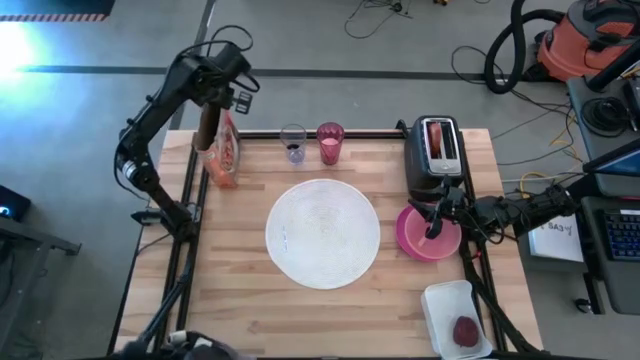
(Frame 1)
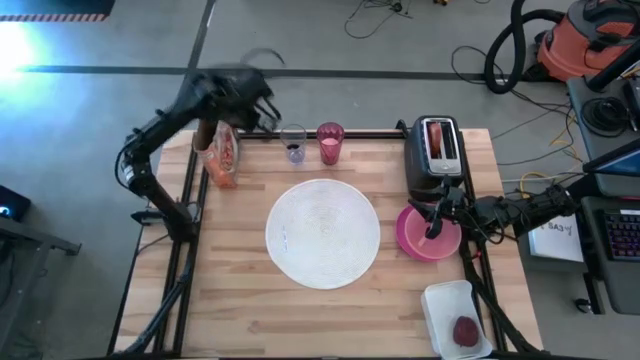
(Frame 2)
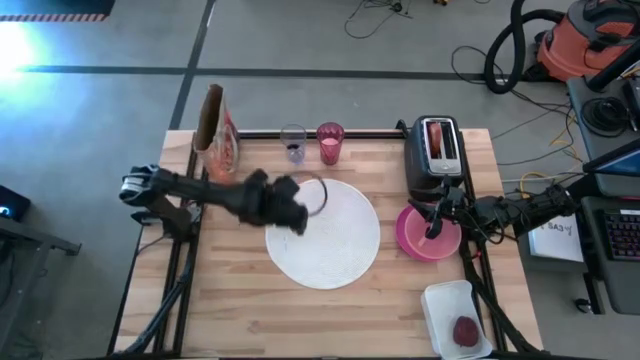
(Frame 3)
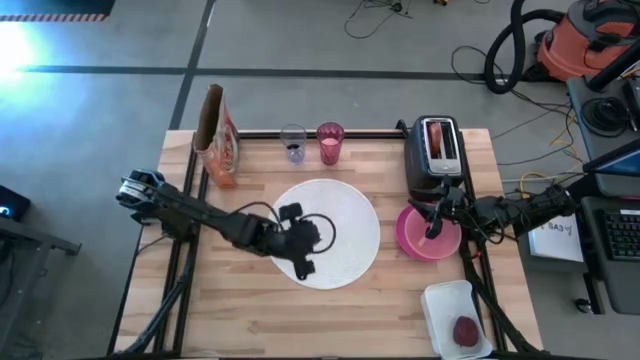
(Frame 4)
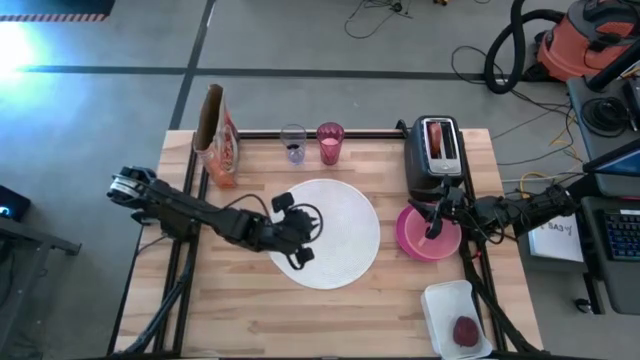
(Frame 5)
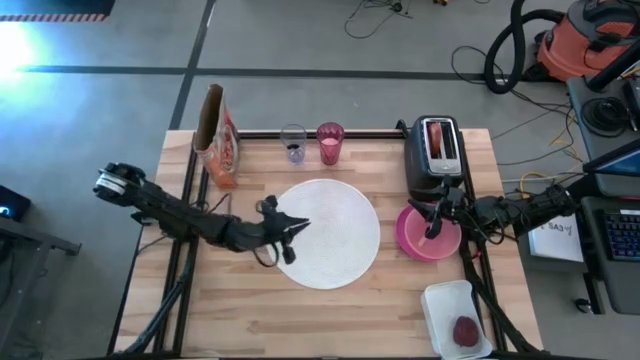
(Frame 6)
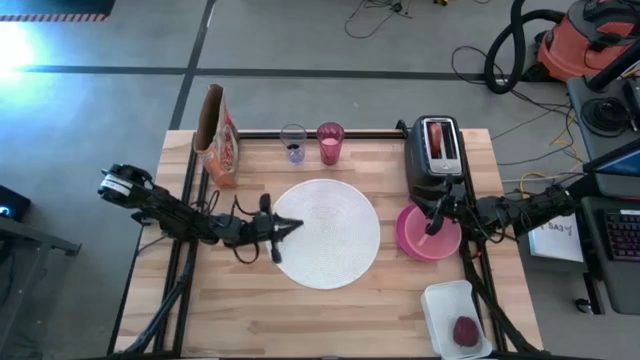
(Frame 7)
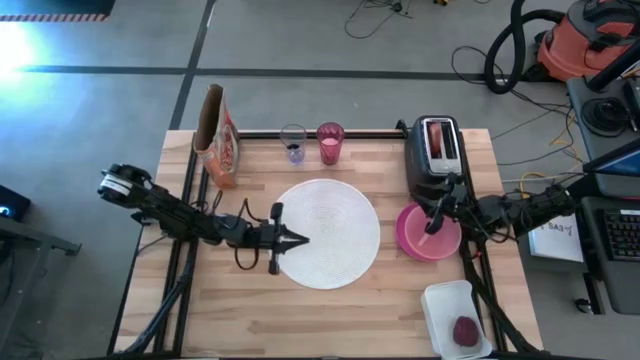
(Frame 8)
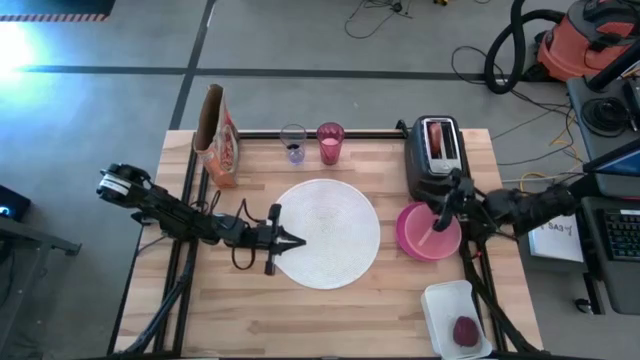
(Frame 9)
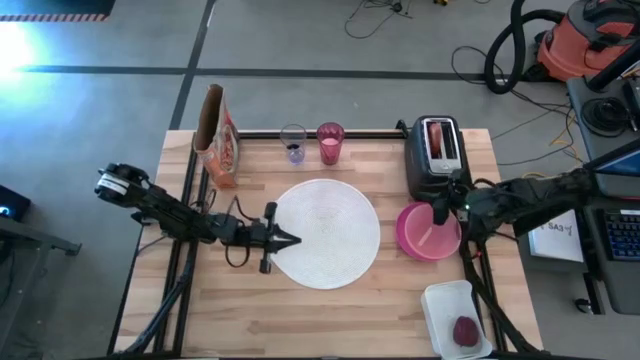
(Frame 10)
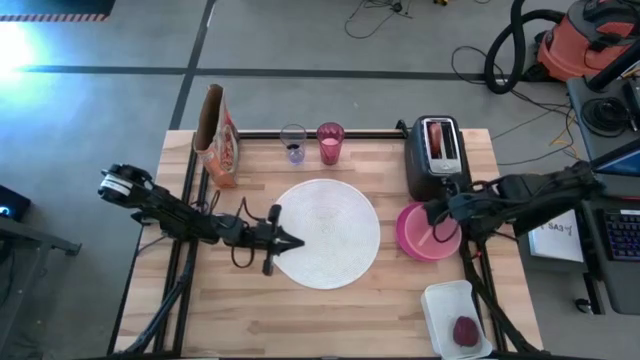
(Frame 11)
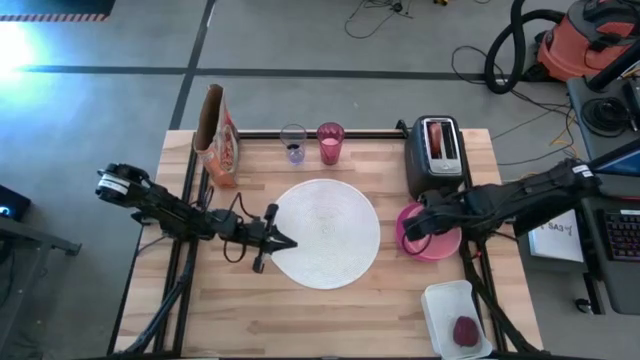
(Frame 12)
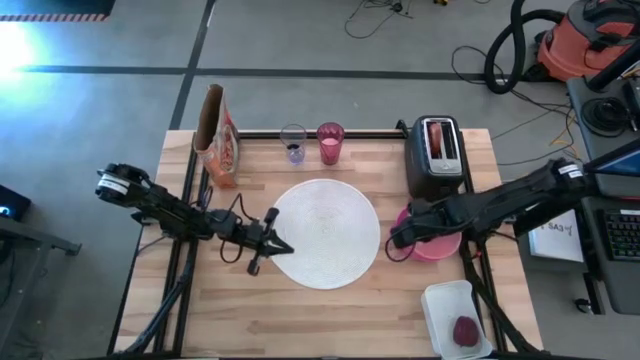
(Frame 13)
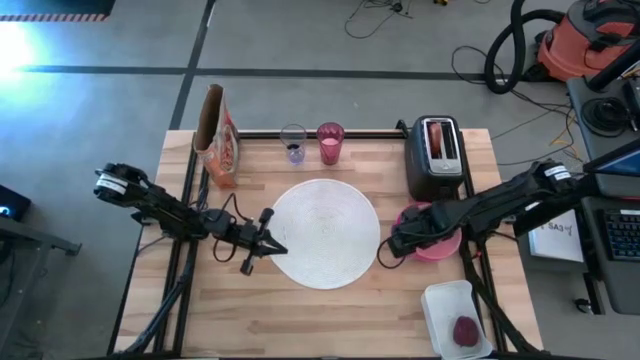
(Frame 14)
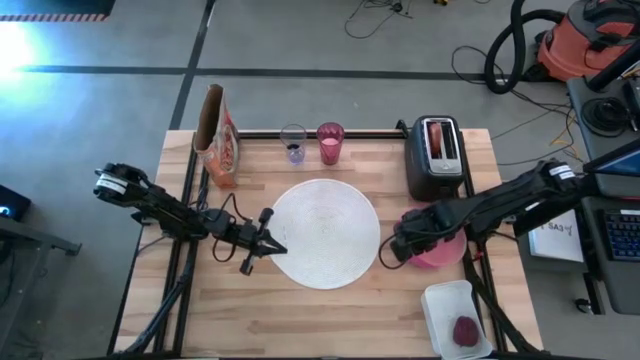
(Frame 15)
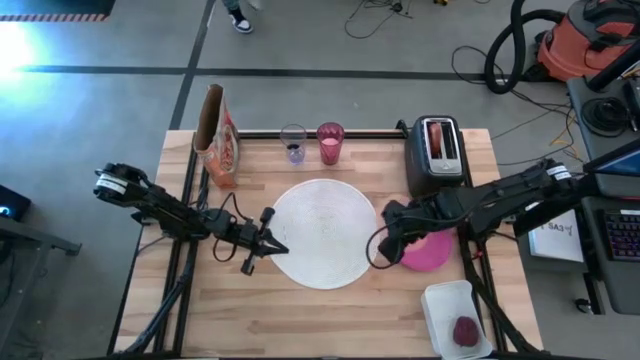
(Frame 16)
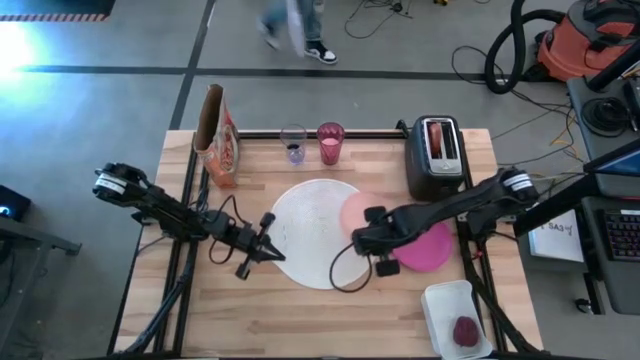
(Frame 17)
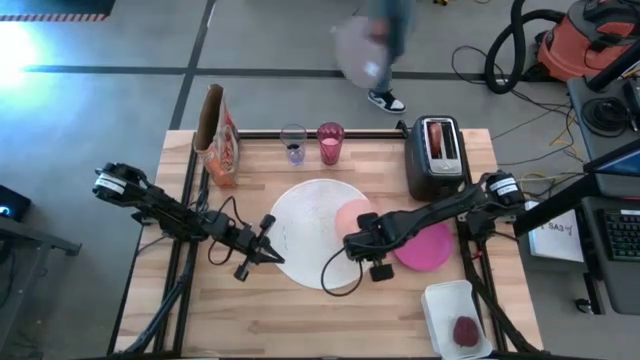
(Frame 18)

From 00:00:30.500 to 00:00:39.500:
Task: Arrange a breakfast setting
Put the orange bowl on the table mat

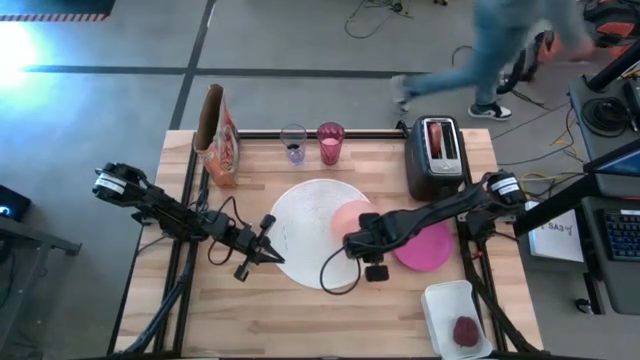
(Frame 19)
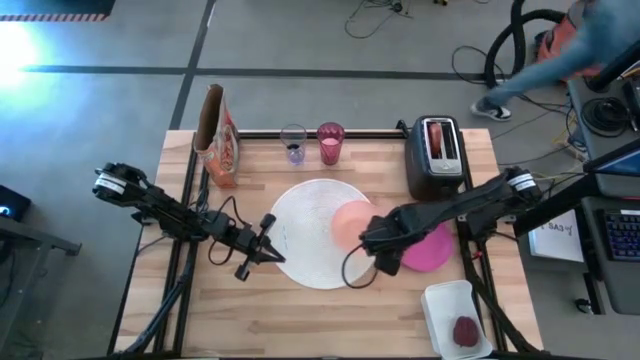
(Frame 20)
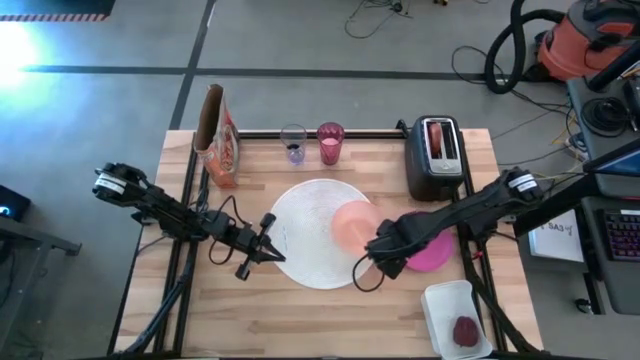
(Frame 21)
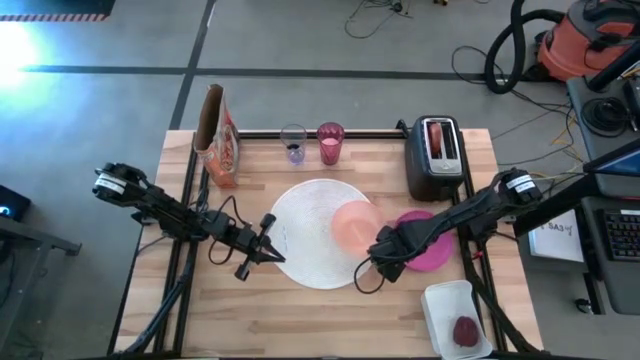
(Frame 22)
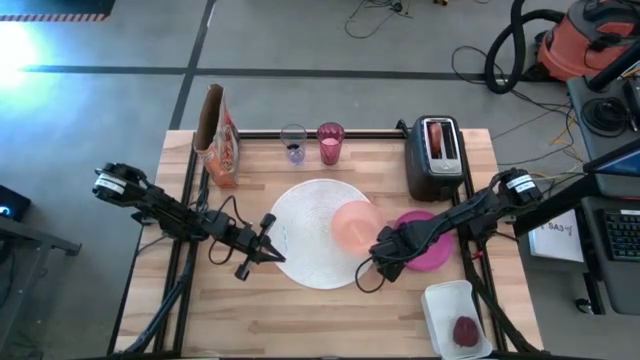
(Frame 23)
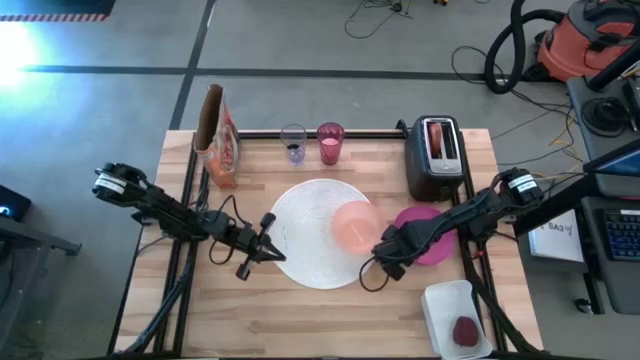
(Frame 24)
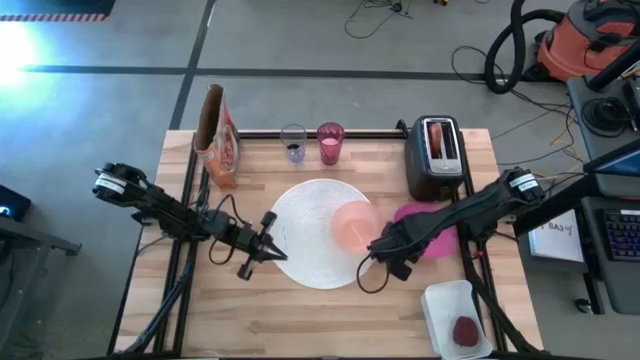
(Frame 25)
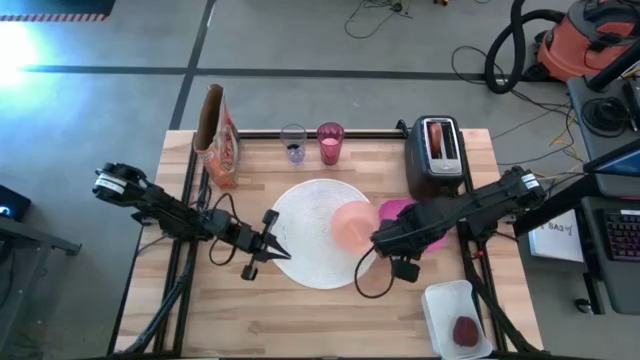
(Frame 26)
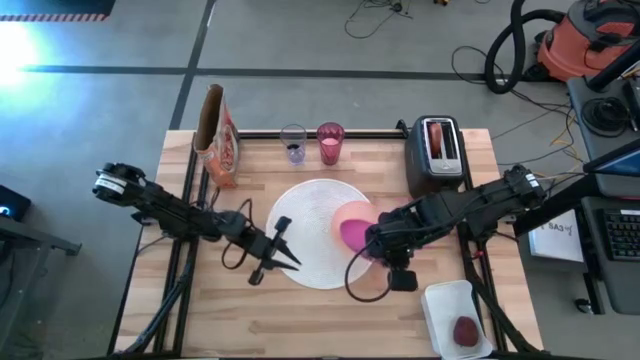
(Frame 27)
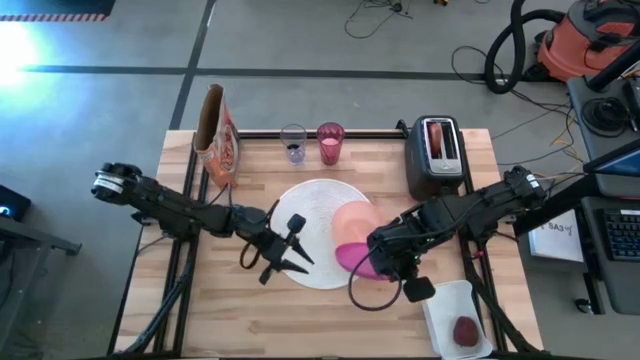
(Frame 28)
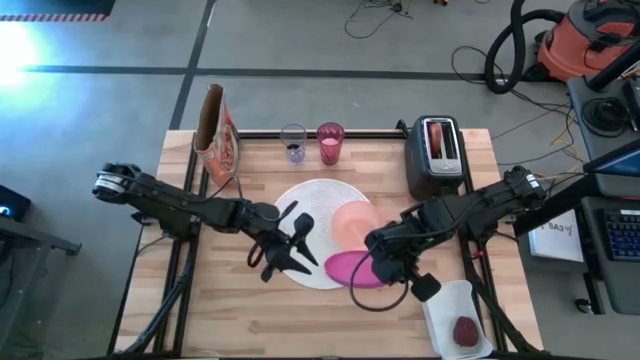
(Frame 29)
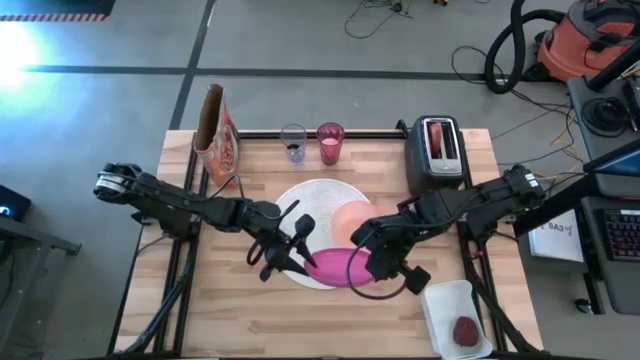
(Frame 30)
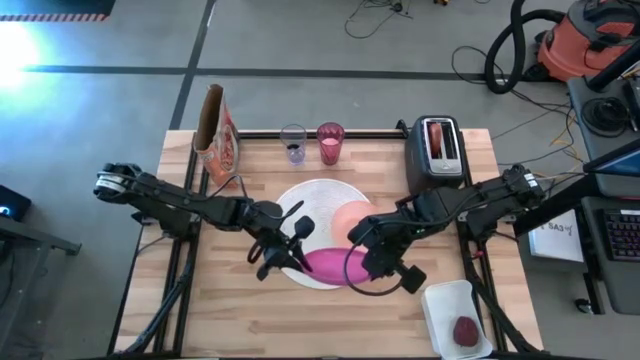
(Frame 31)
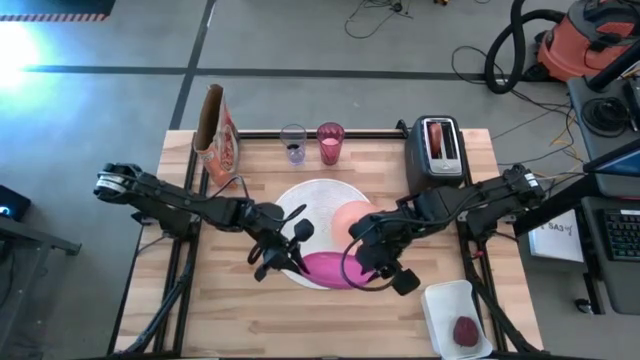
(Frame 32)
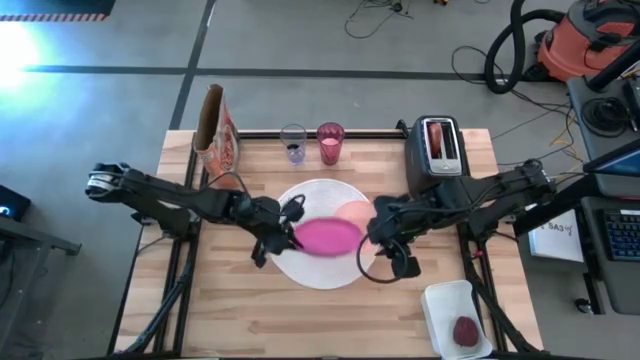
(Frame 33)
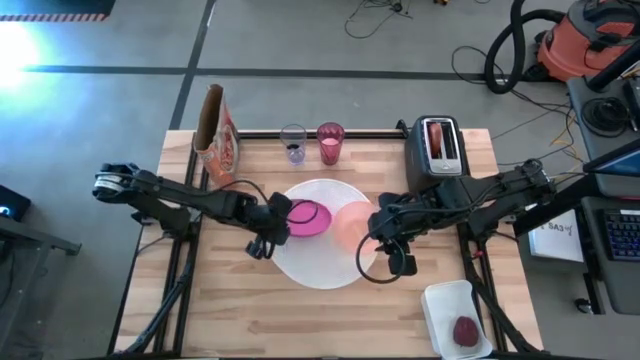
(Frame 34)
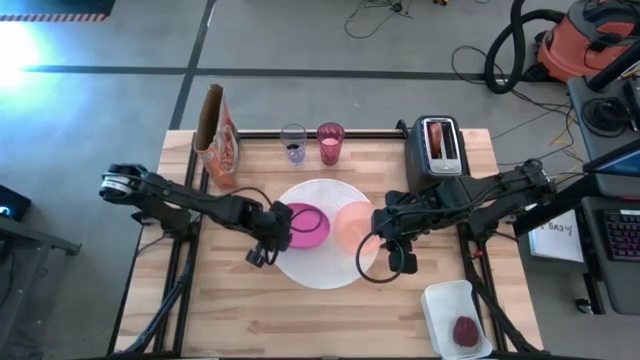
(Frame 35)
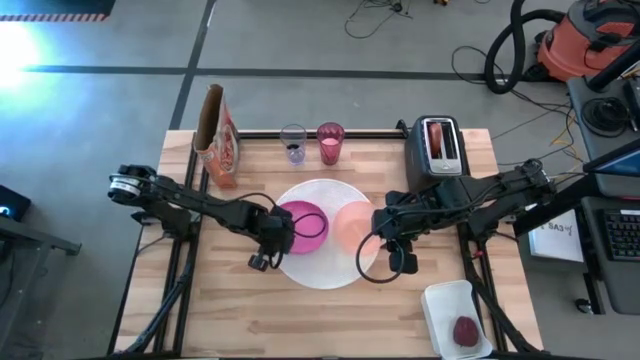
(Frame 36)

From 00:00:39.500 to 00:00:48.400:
Put the pink plate on the table placemat to the left of the orange bowl

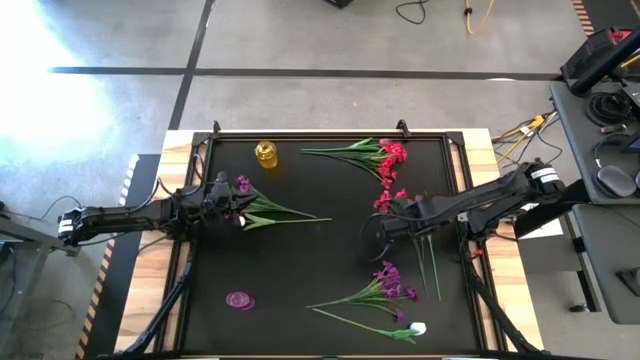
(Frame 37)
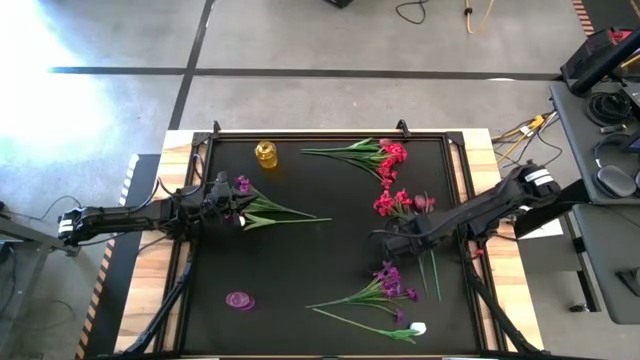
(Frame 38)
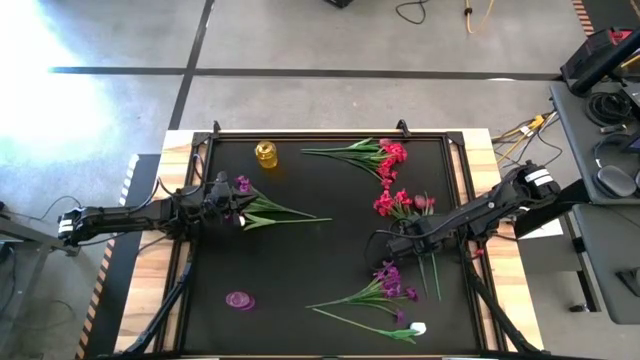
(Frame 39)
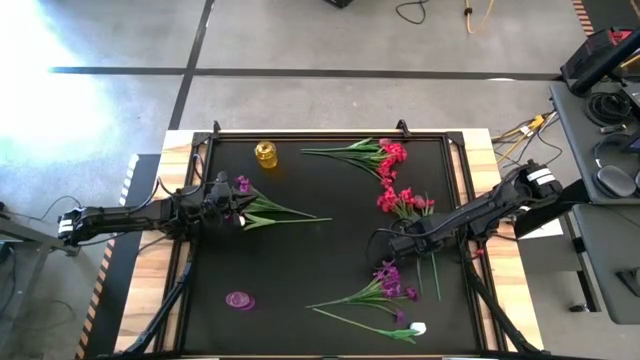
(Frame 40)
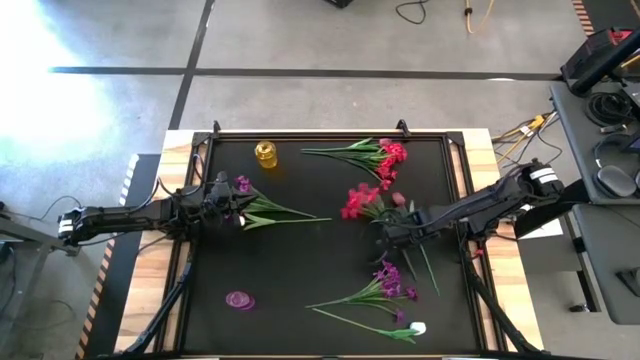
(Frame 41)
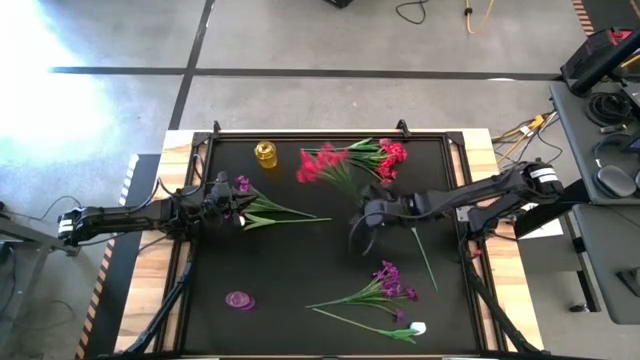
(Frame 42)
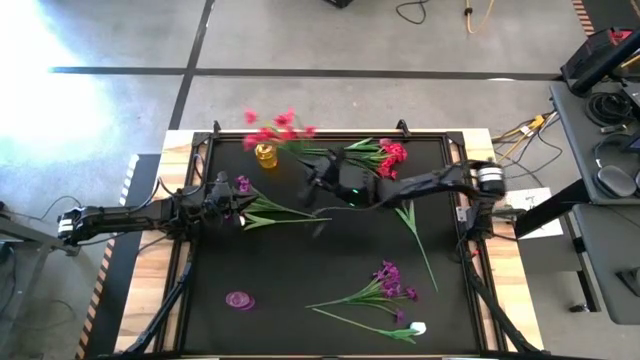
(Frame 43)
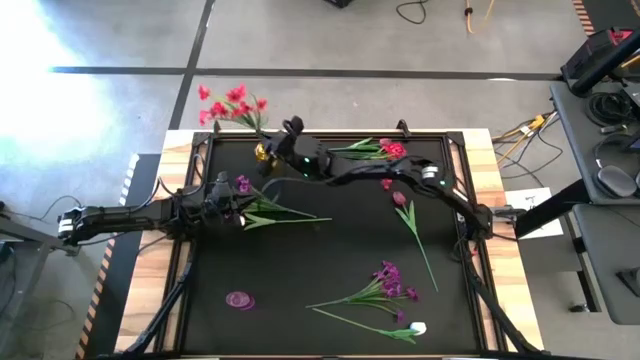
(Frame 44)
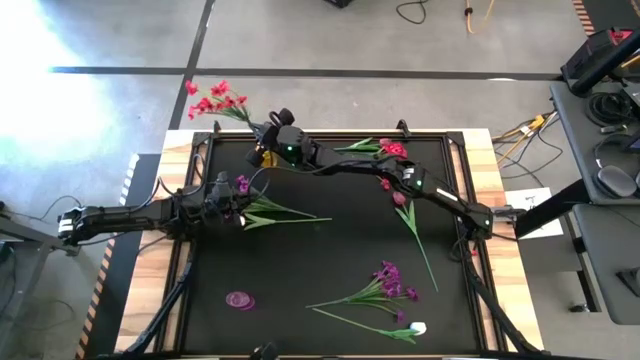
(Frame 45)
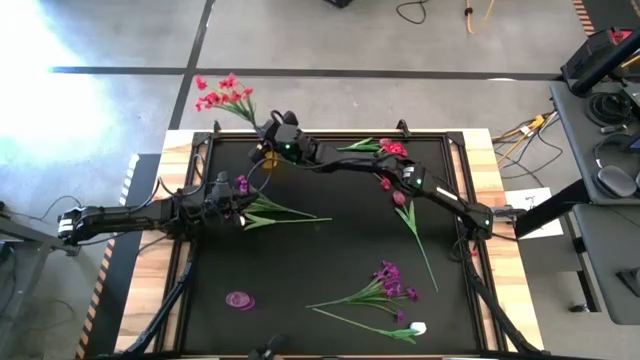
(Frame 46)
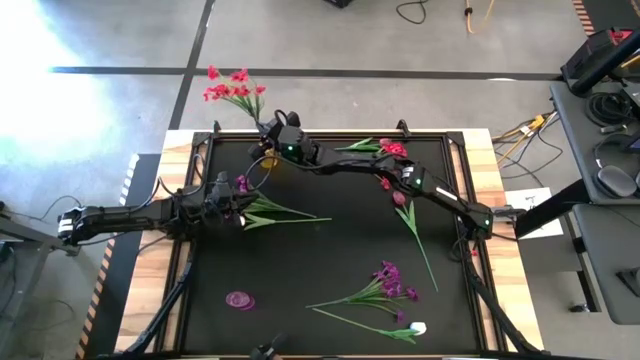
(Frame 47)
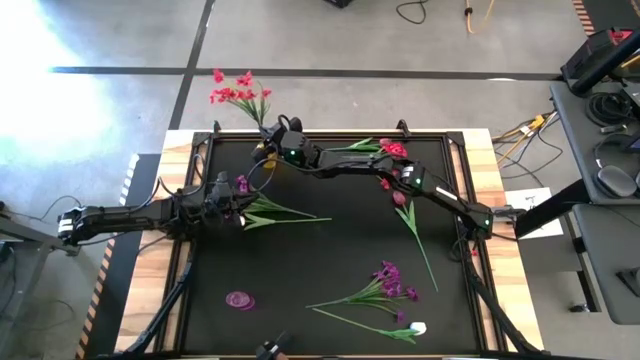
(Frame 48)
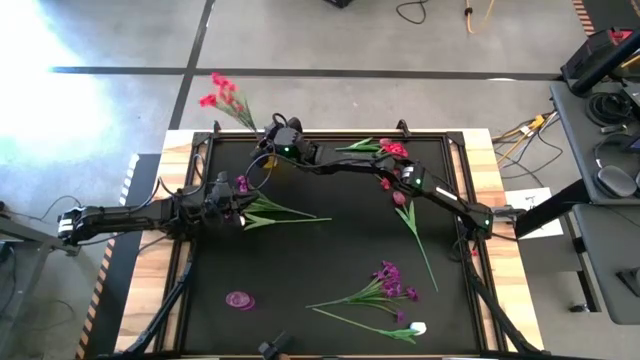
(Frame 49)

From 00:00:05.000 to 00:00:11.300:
Task: Sort flowers into vase by color
Put the right red flowers into the yellow vase
